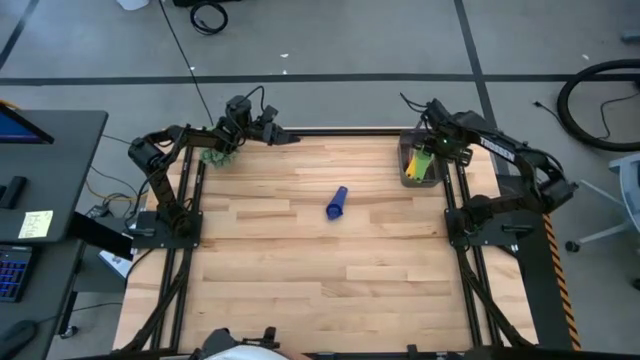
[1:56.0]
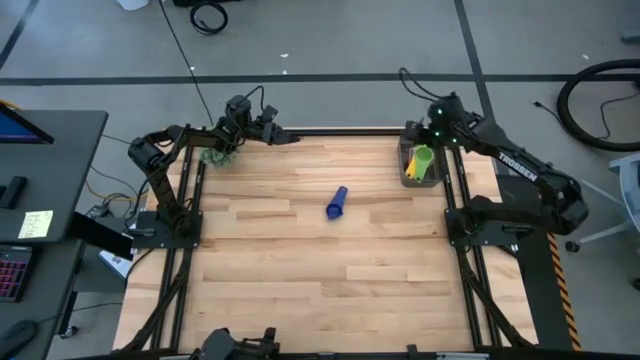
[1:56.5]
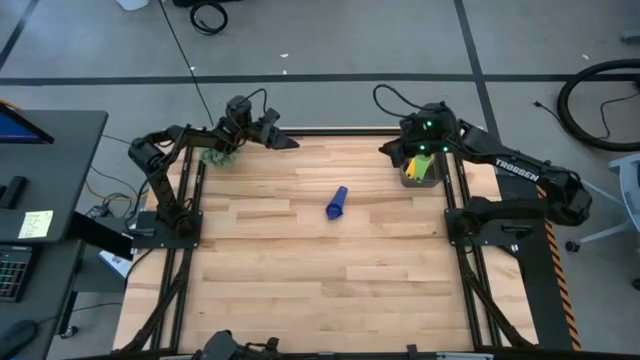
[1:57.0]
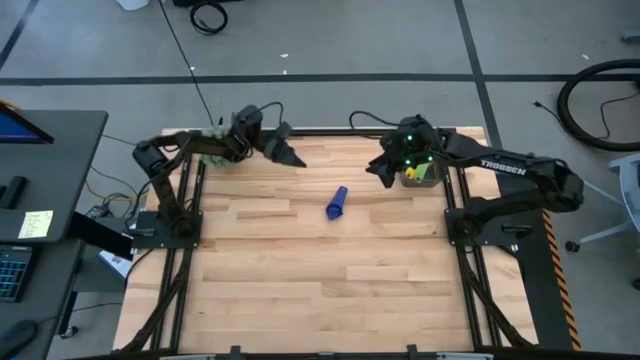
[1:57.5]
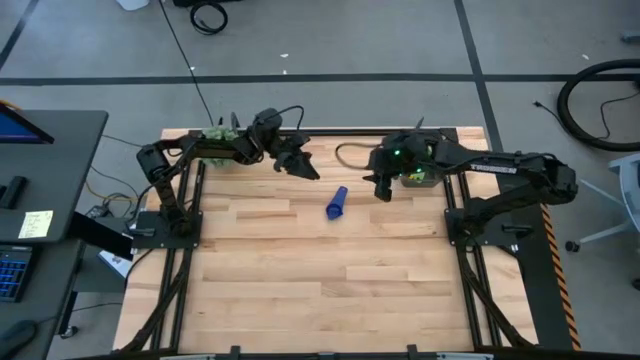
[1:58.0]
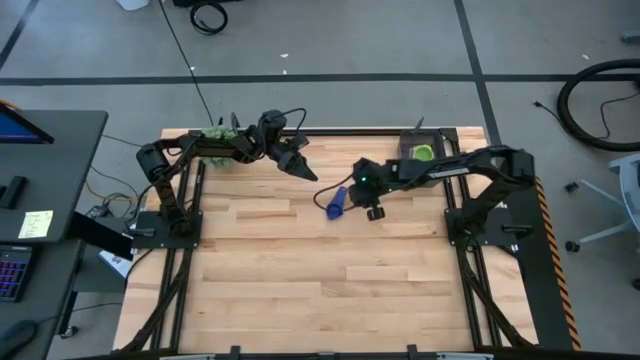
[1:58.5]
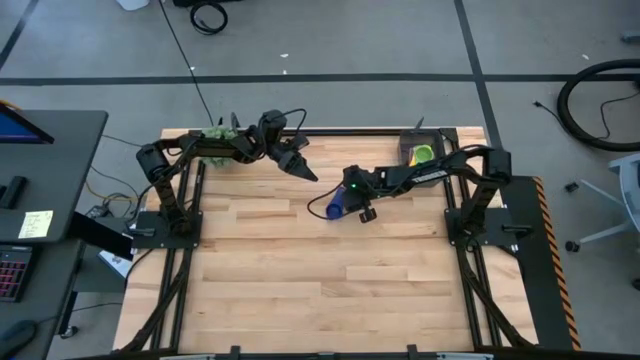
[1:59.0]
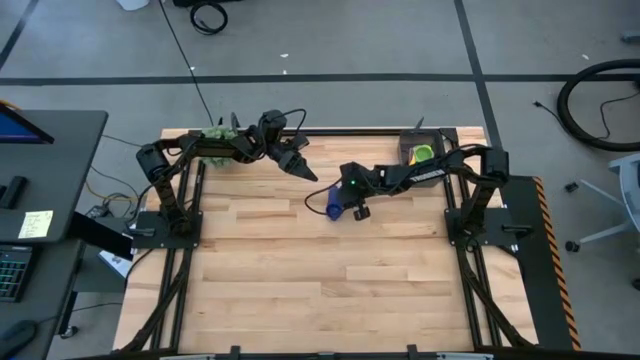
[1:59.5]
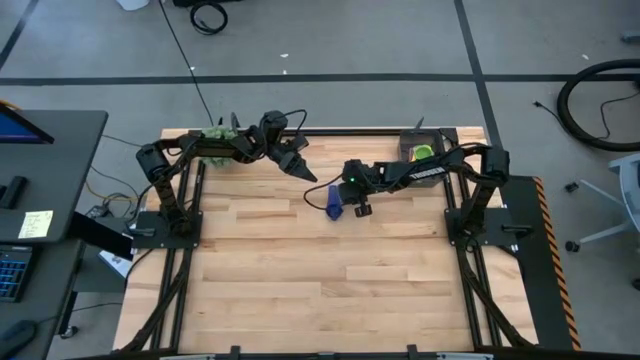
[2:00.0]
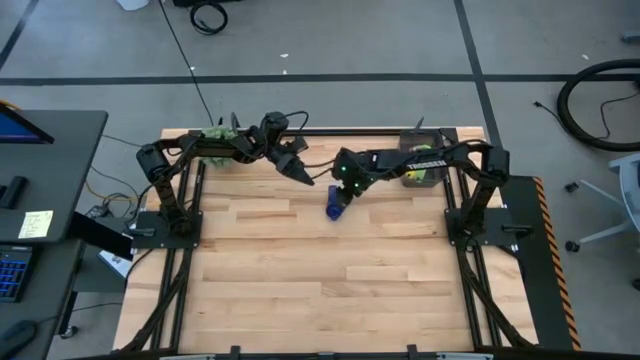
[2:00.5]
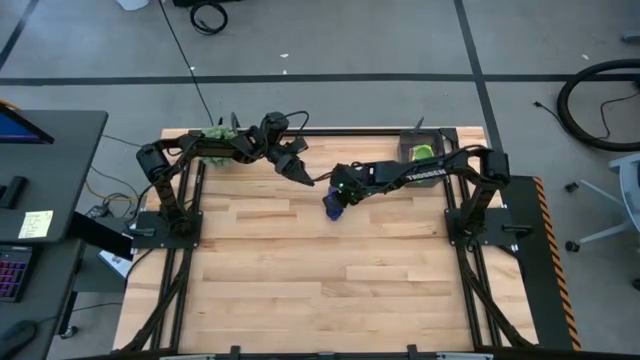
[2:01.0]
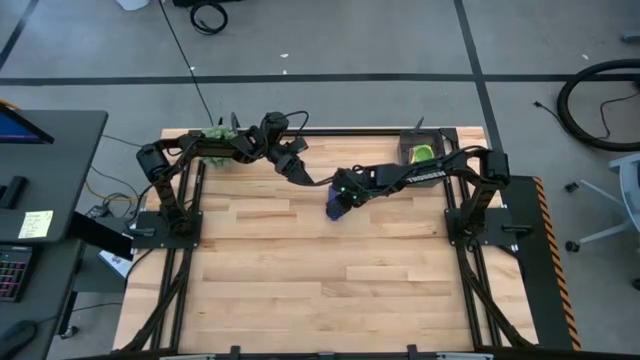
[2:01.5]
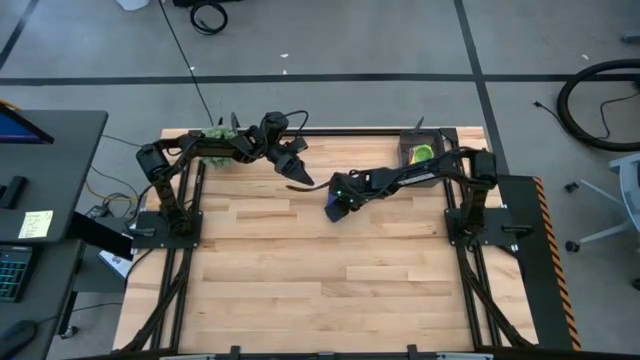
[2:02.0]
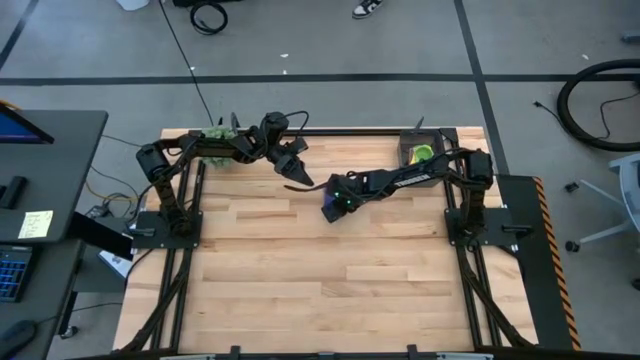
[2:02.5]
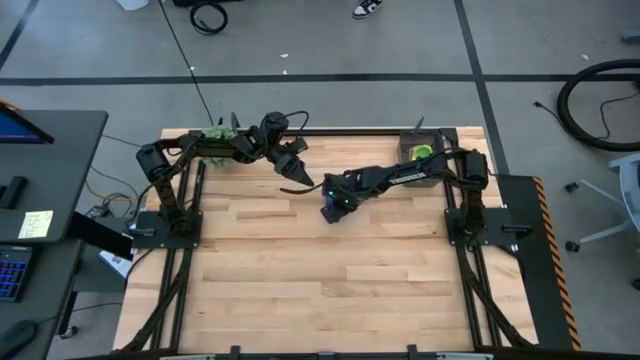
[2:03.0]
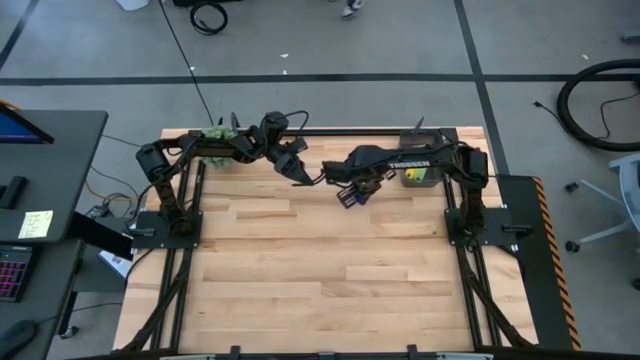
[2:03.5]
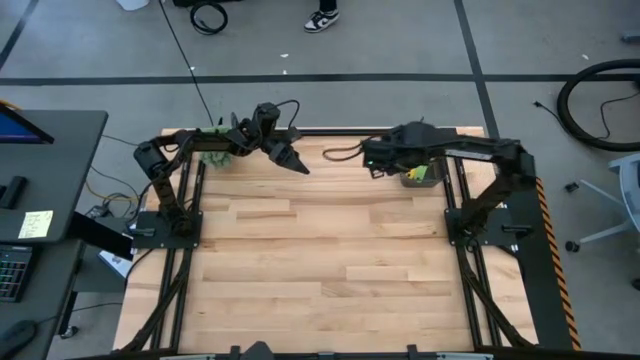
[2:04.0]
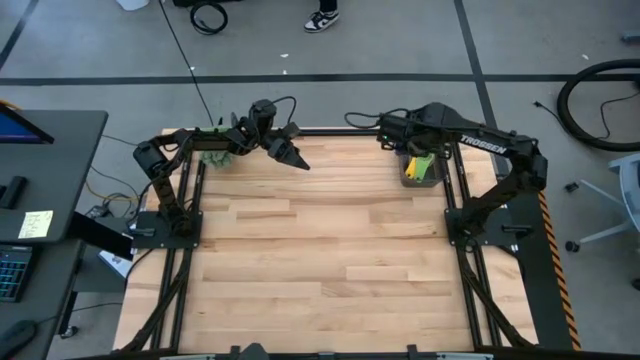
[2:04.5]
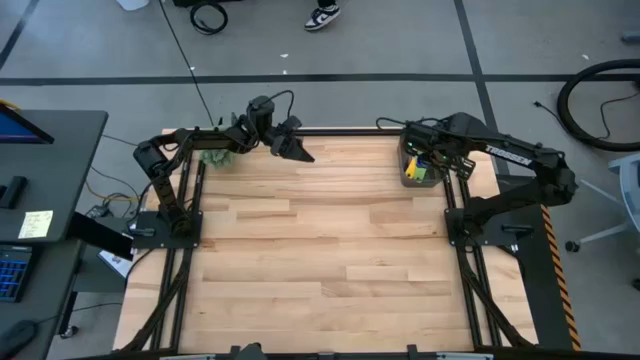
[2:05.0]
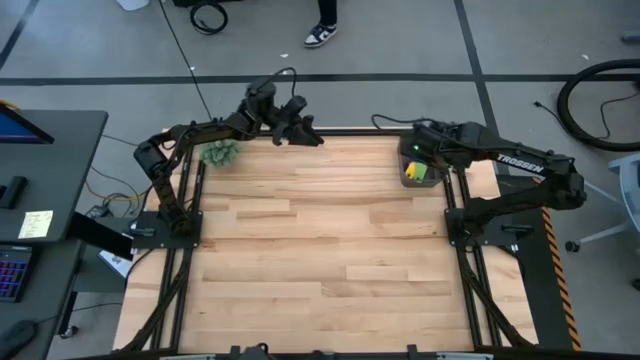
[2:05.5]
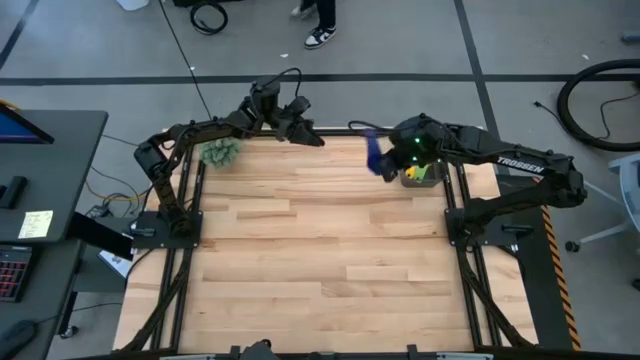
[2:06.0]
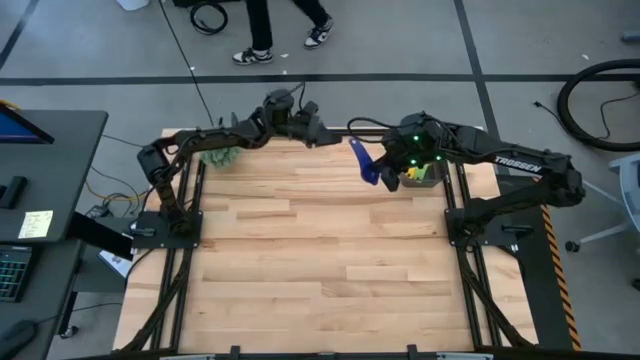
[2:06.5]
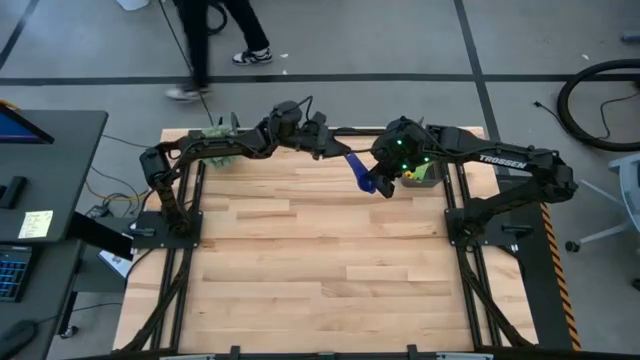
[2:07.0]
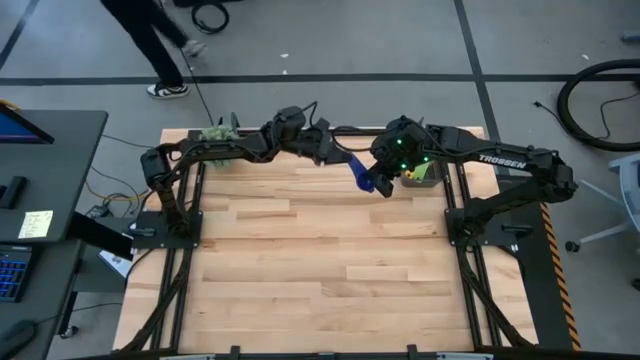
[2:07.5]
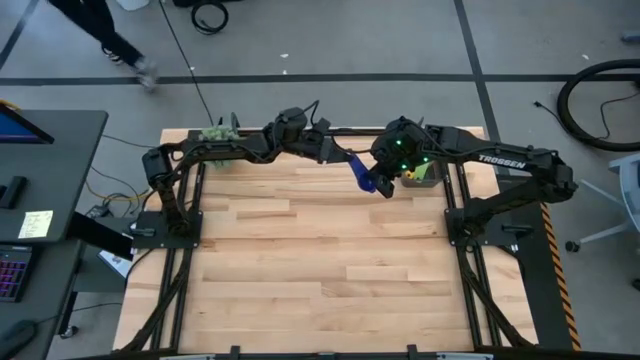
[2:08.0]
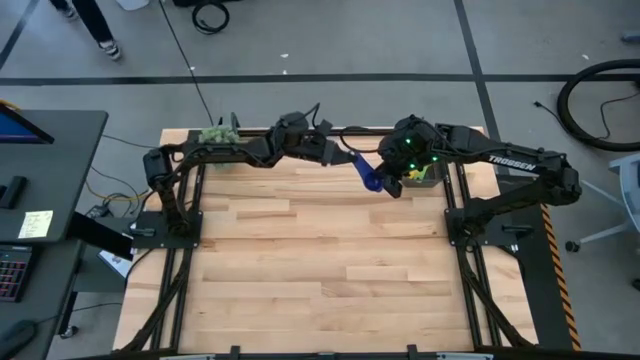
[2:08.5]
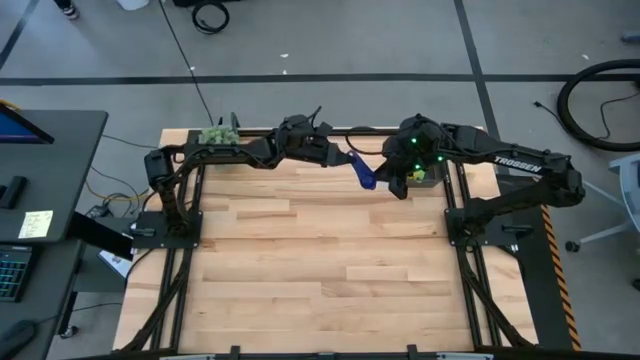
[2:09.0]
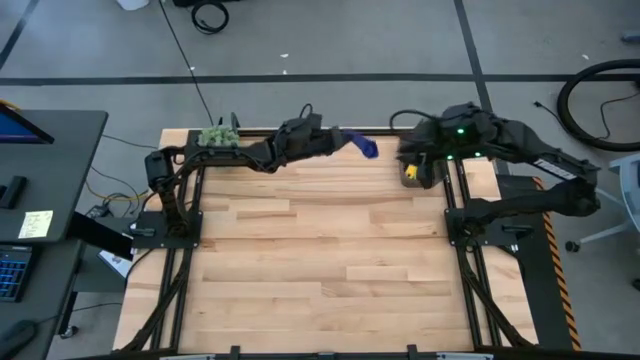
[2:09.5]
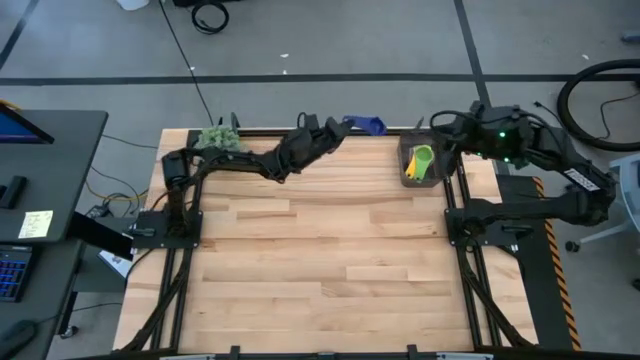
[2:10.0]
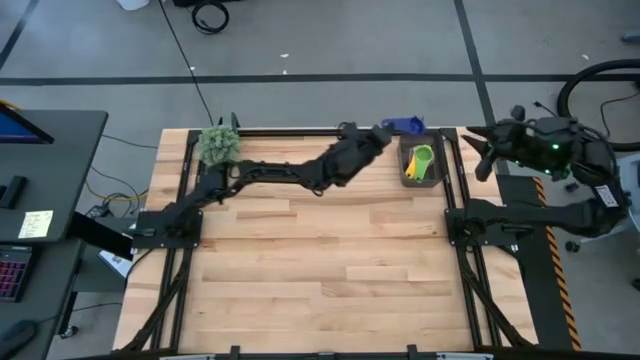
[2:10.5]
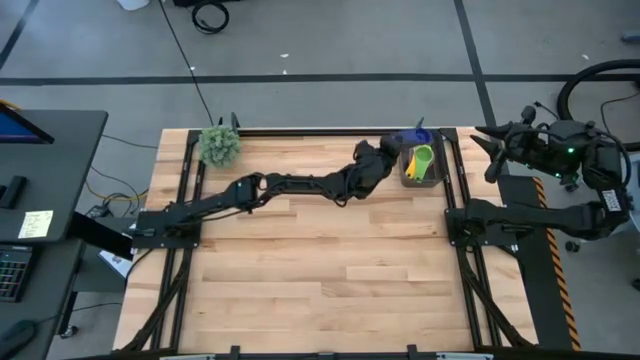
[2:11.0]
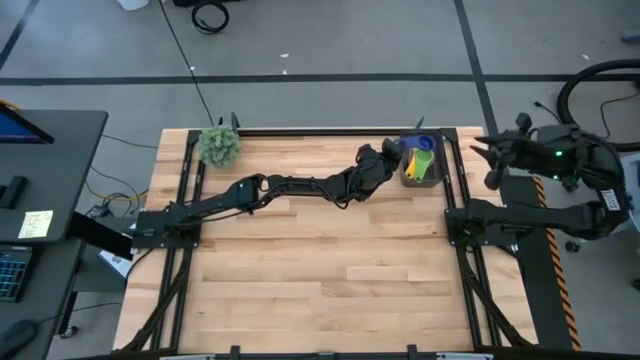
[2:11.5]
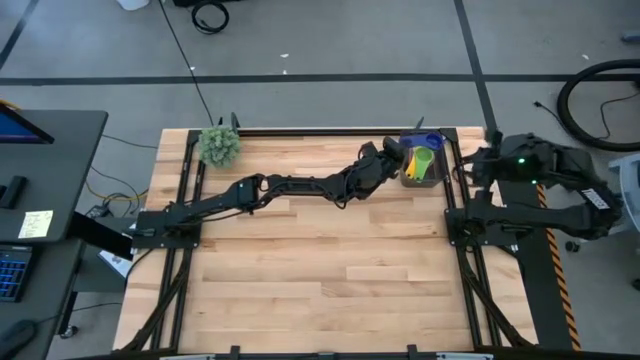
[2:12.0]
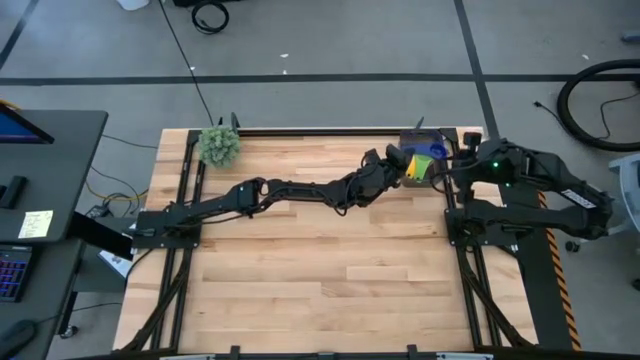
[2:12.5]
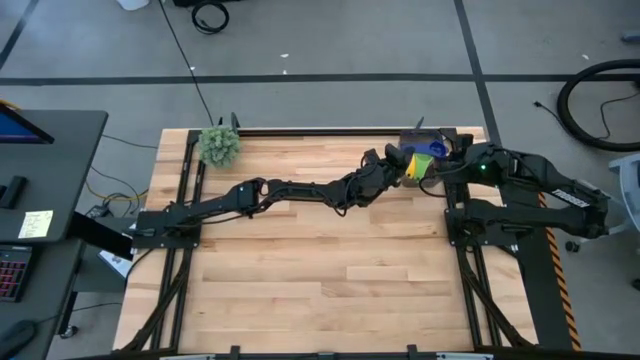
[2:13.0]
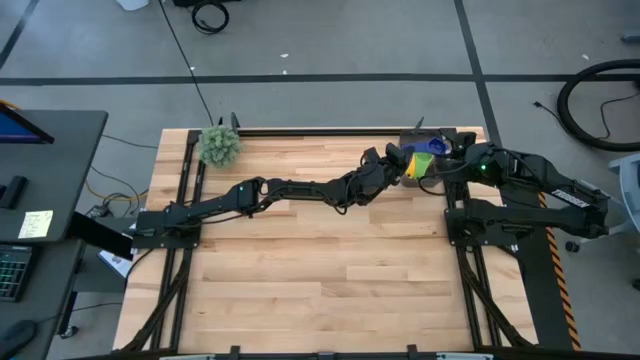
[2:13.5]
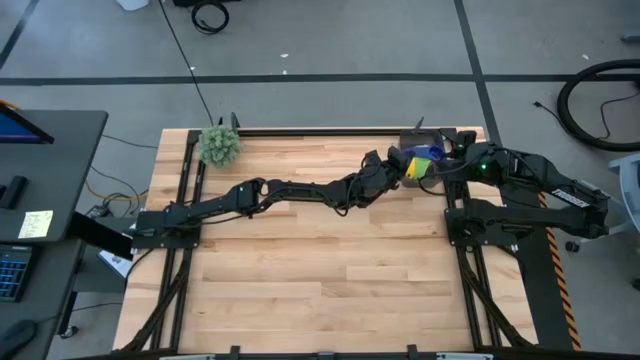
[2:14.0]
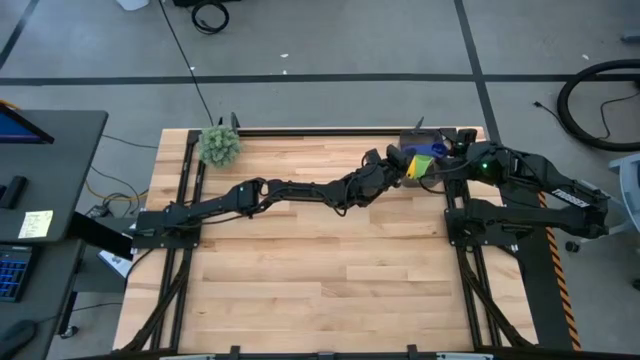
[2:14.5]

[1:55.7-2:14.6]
Task: Nest measuring cups in basket
Stack the purple measuring cup on top of the green measuring cup in the black bin

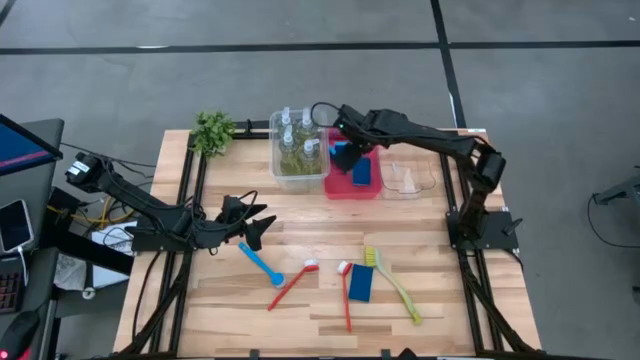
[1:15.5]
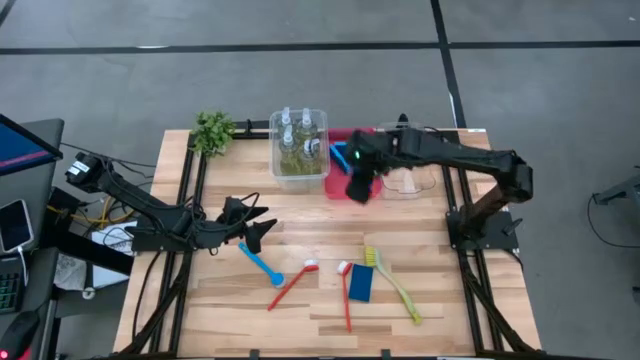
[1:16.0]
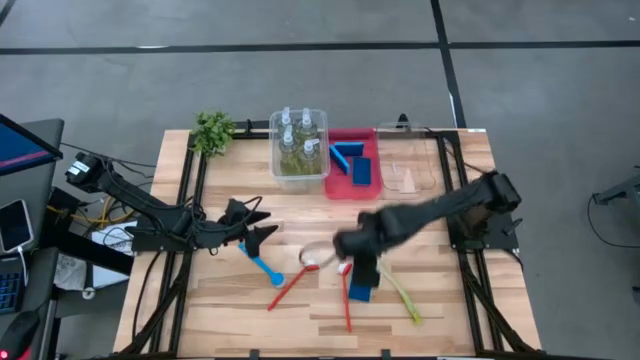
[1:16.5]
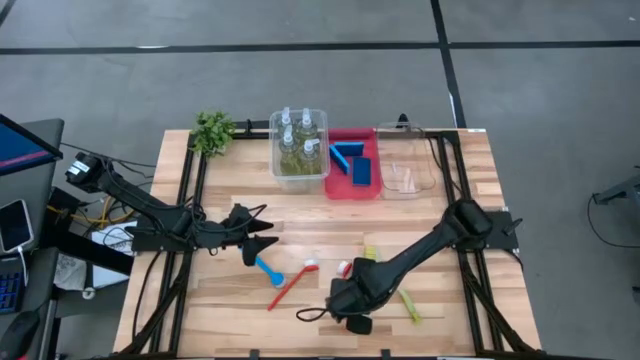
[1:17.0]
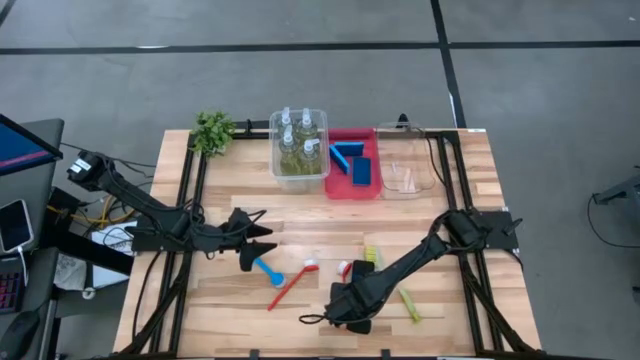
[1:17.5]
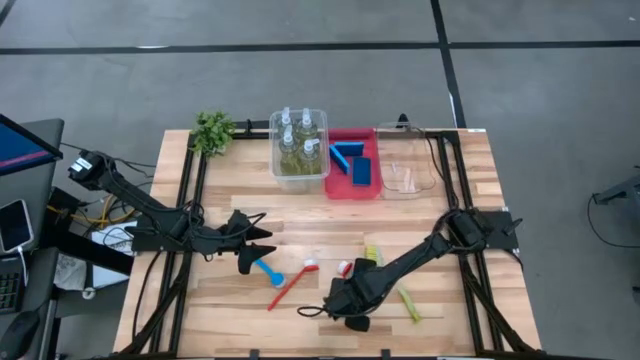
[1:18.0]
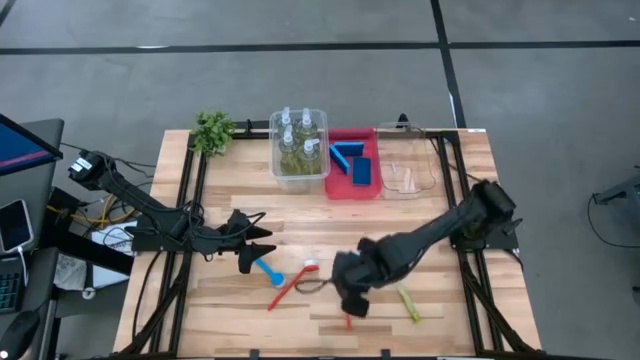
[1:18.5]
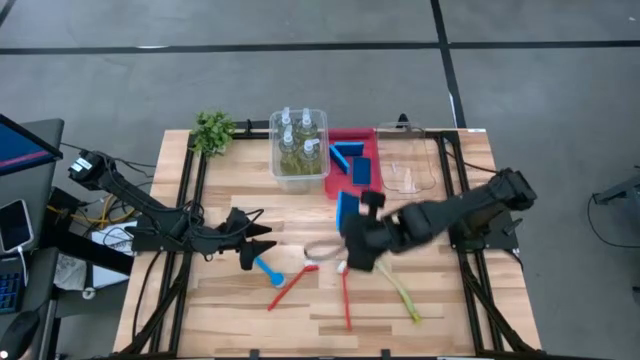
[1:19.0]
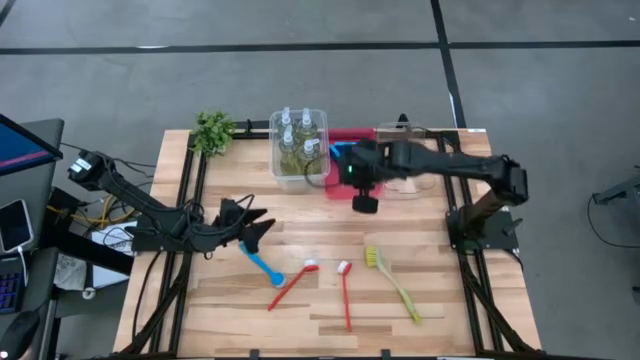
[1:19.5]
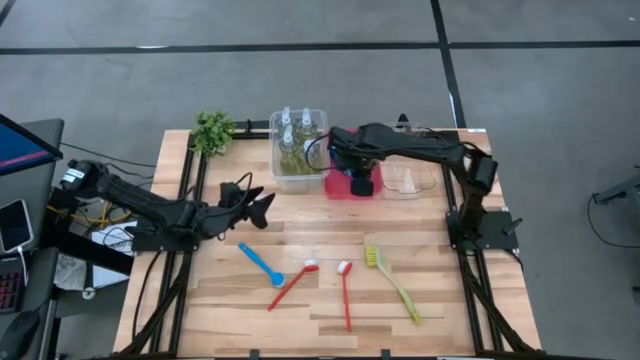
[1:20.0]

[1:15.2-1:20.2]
Task: Pick & Place Kitchen Sink Supplies
Put the blue sponge into the red bin
